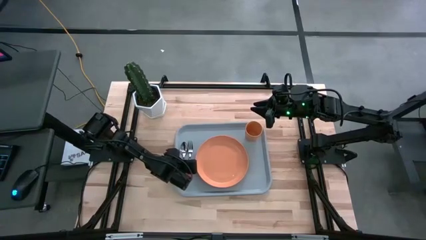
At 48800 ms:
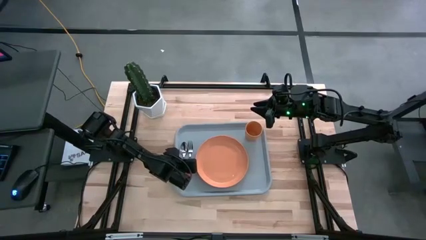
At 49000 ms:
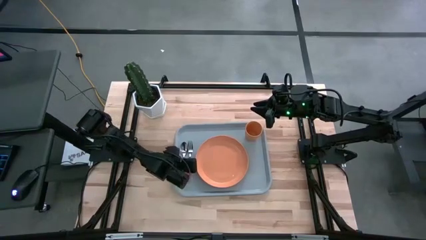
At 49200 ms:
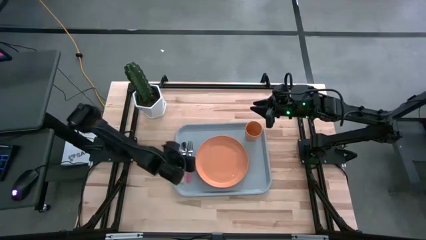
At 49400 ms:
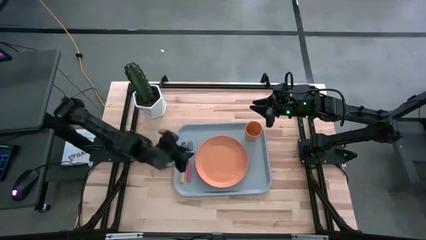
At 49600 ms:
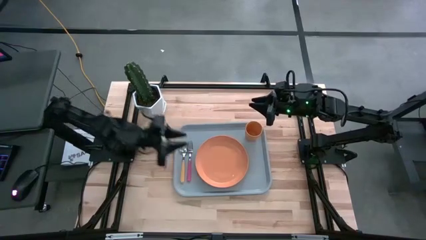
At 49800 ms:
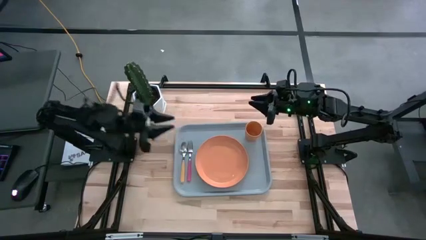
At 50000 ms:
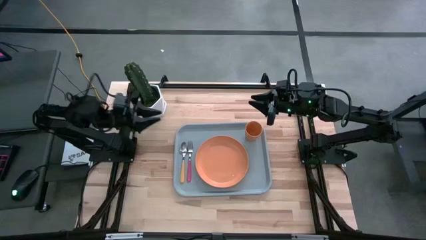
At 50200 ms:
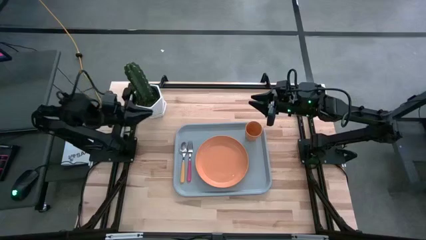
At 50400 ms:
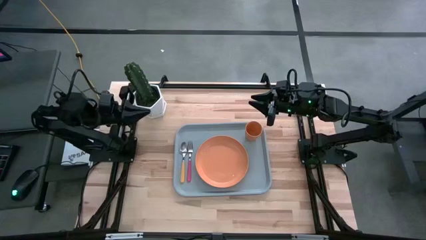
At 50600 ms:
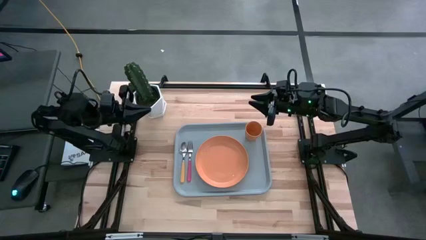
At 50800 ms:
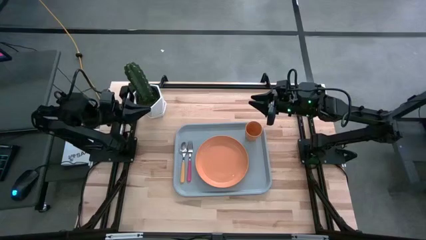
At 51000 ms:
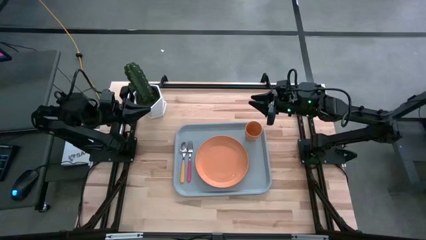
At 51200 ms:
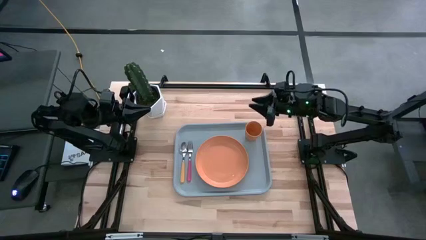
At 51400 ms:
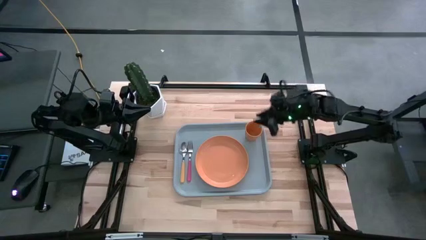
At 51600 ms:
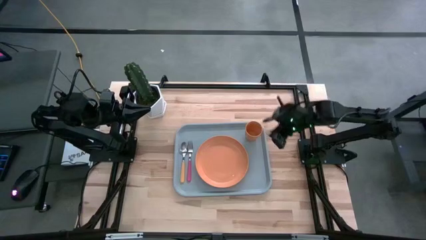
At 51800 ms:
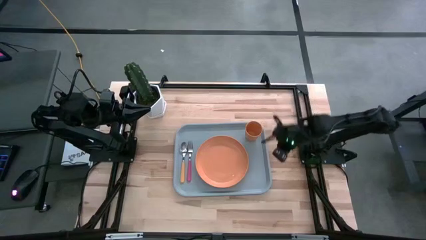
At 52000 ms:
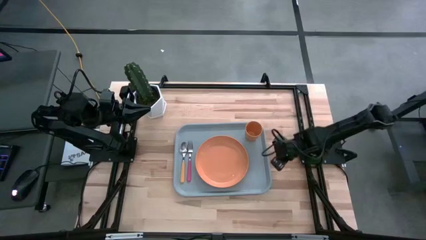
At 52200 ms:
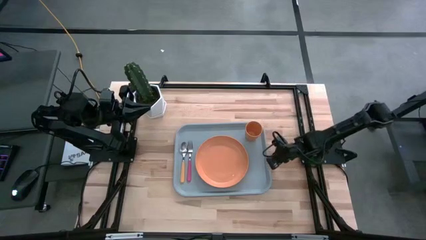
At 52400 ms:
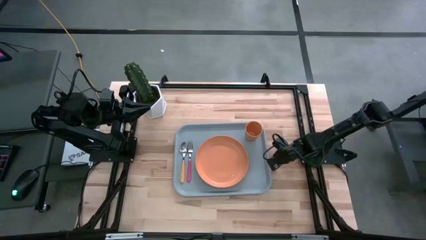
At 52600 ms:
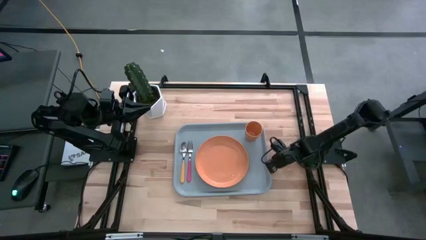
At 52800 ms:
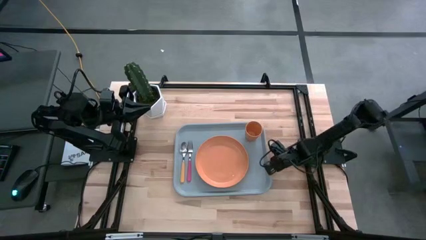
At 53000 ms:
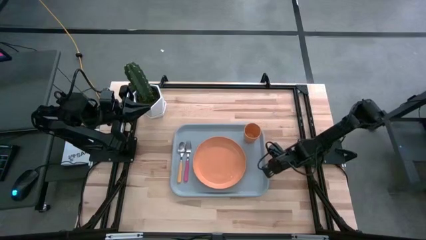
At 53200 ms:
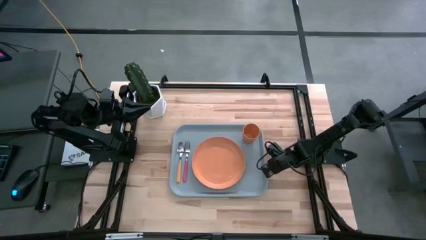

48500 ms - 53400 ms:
Task: Pick and place plate/cup/fork/spoon on tray
Adjust the gray tray

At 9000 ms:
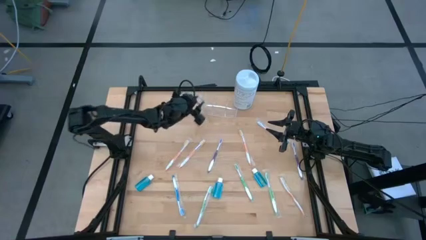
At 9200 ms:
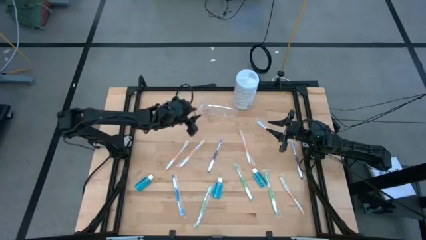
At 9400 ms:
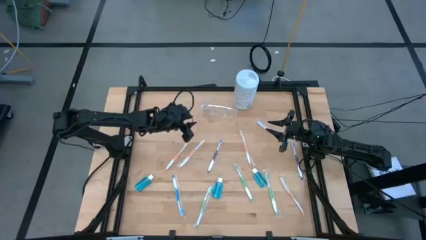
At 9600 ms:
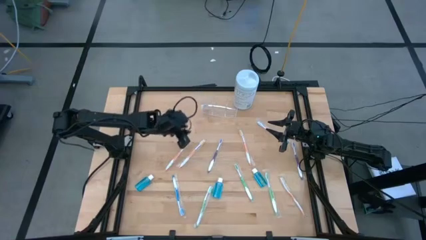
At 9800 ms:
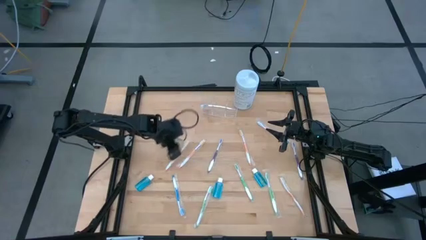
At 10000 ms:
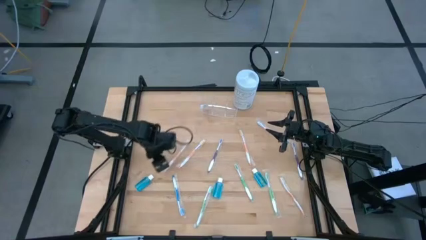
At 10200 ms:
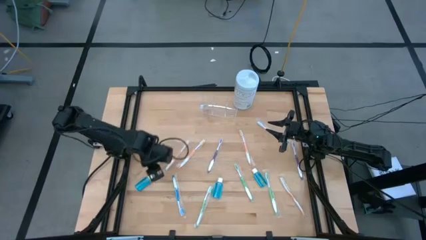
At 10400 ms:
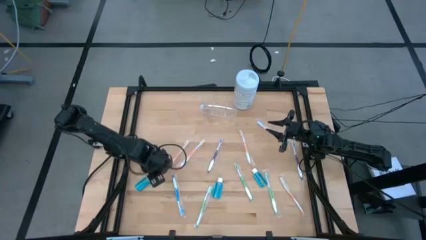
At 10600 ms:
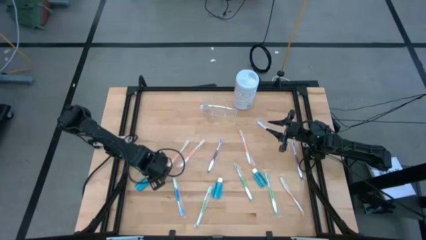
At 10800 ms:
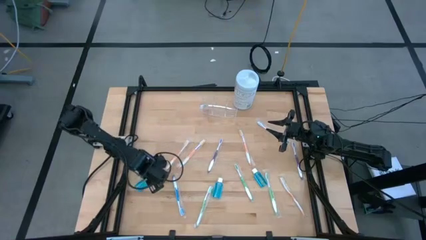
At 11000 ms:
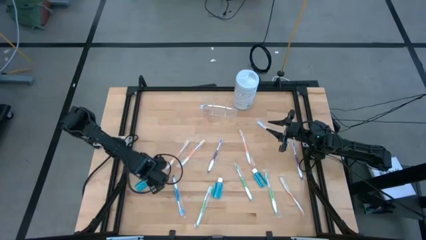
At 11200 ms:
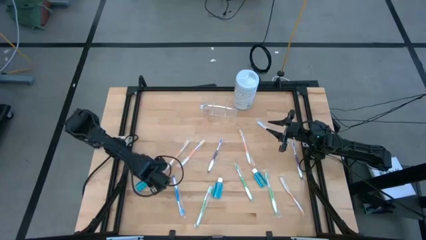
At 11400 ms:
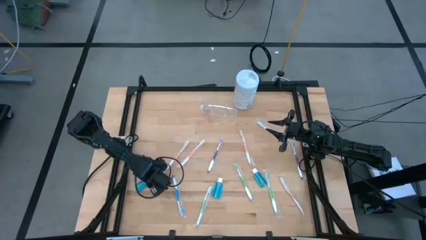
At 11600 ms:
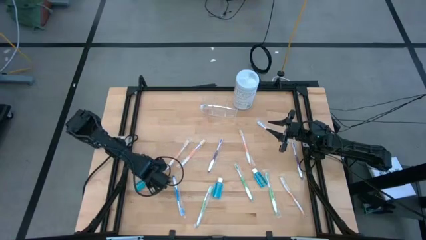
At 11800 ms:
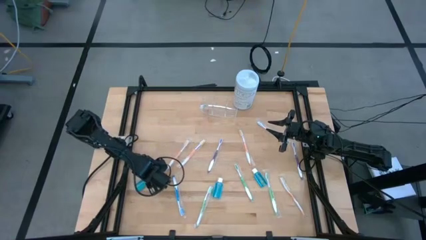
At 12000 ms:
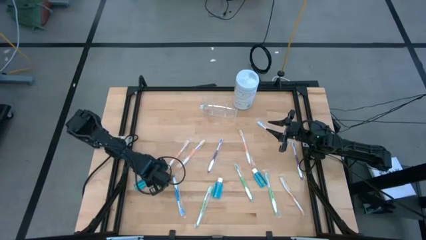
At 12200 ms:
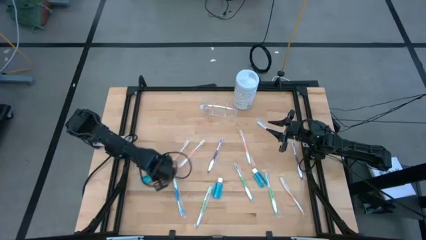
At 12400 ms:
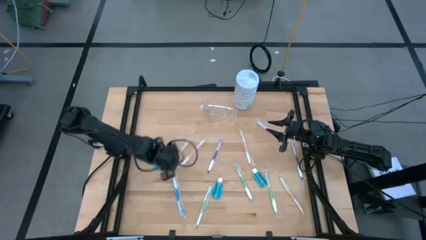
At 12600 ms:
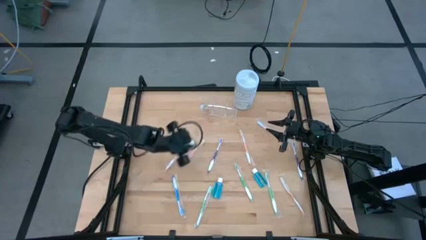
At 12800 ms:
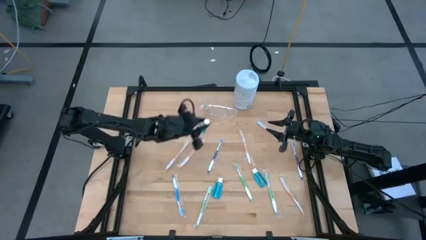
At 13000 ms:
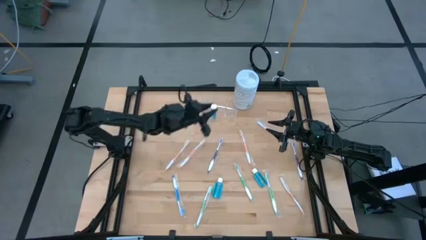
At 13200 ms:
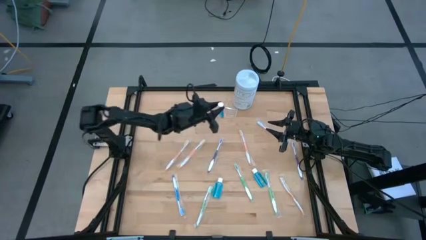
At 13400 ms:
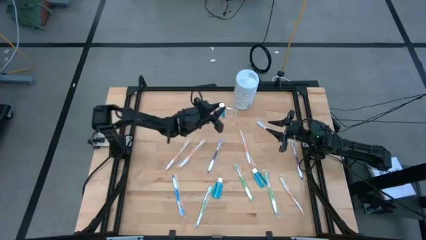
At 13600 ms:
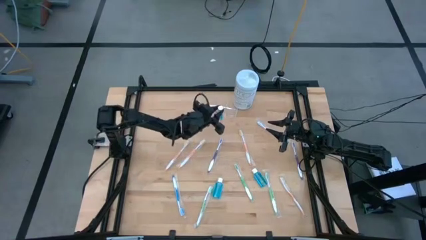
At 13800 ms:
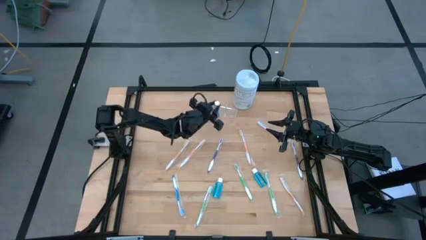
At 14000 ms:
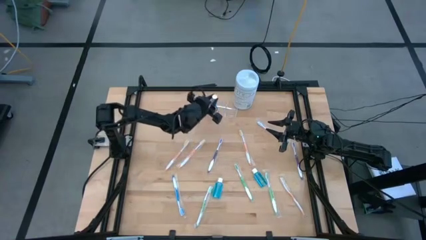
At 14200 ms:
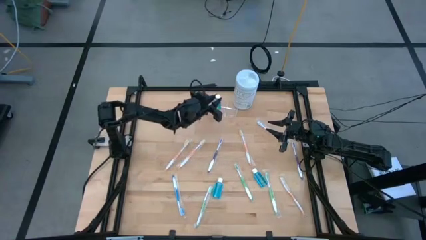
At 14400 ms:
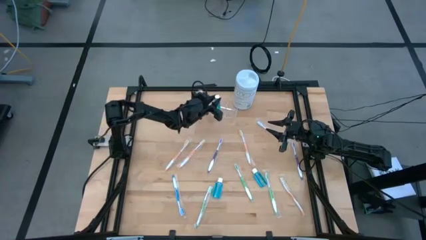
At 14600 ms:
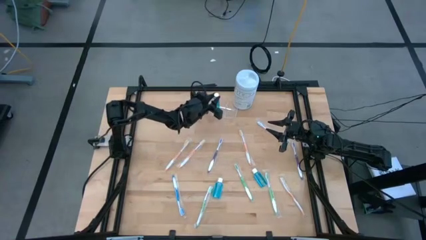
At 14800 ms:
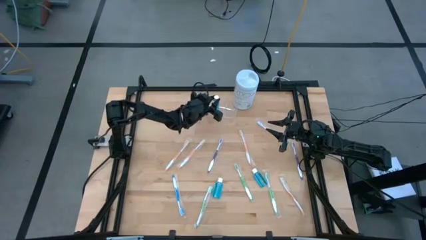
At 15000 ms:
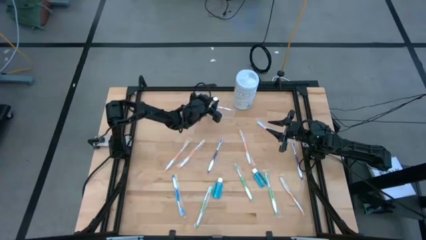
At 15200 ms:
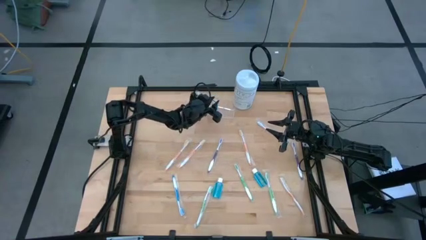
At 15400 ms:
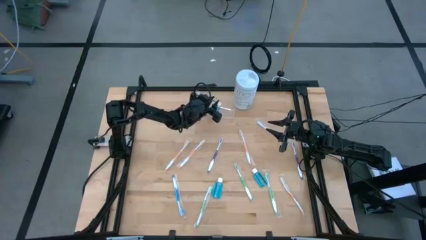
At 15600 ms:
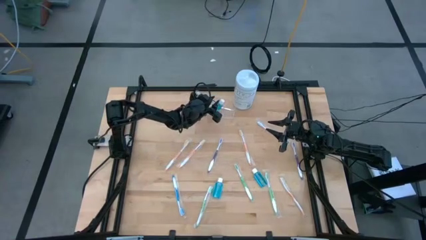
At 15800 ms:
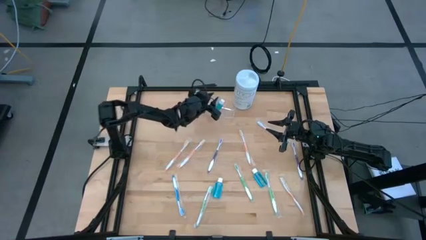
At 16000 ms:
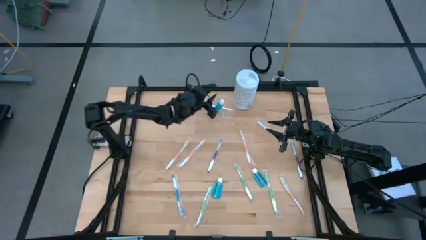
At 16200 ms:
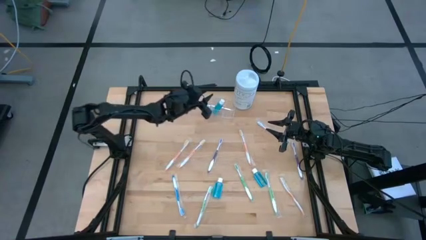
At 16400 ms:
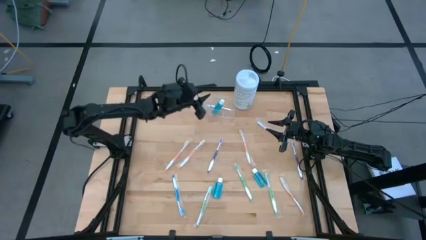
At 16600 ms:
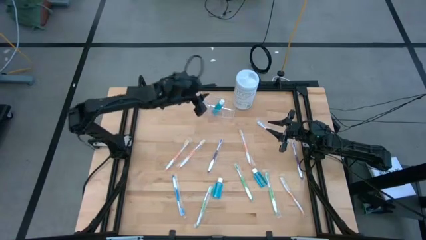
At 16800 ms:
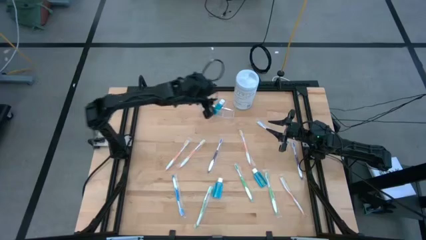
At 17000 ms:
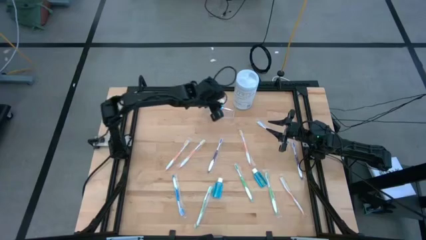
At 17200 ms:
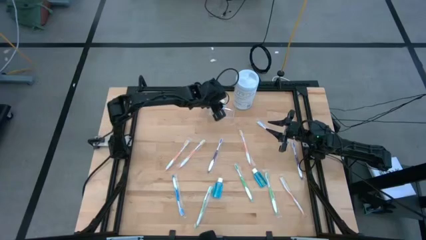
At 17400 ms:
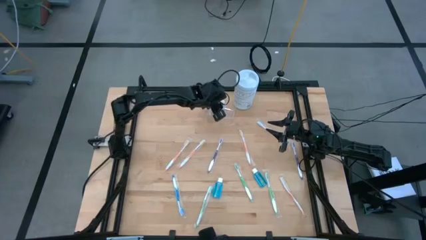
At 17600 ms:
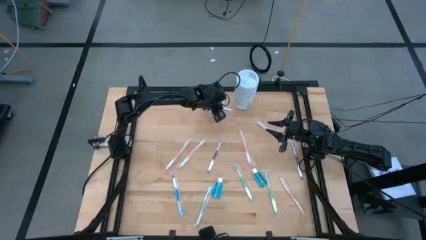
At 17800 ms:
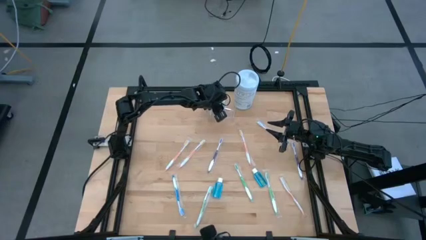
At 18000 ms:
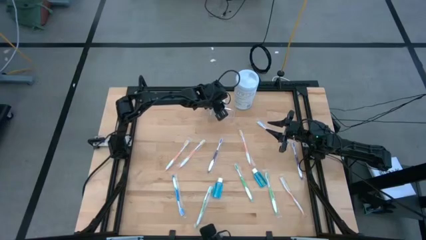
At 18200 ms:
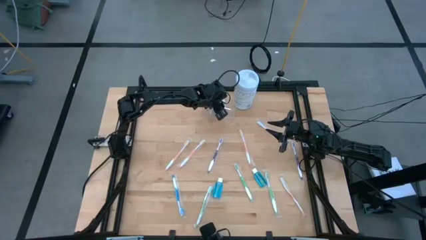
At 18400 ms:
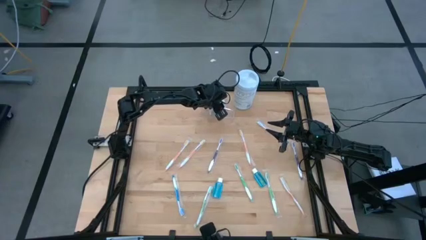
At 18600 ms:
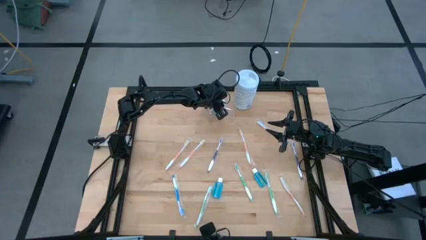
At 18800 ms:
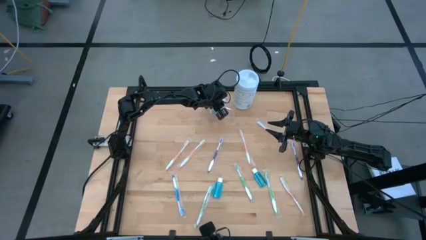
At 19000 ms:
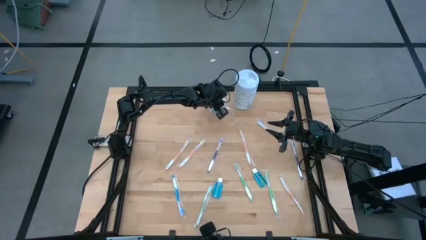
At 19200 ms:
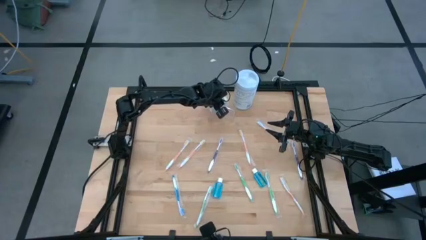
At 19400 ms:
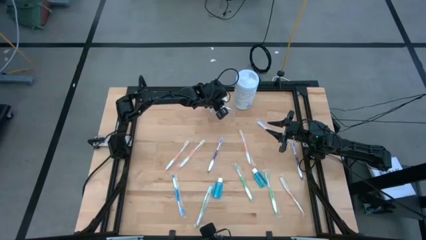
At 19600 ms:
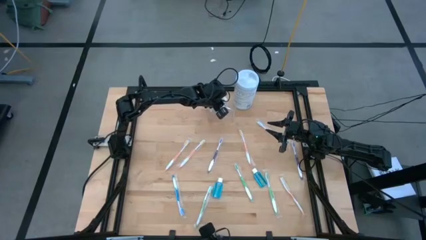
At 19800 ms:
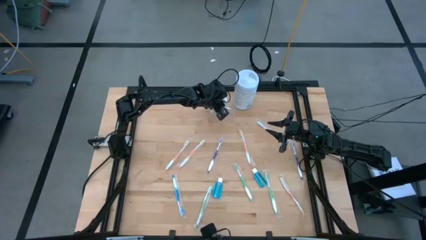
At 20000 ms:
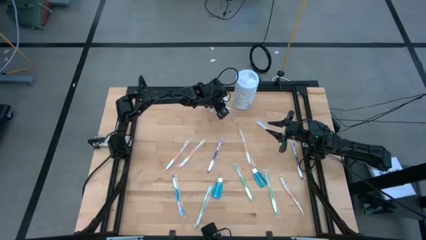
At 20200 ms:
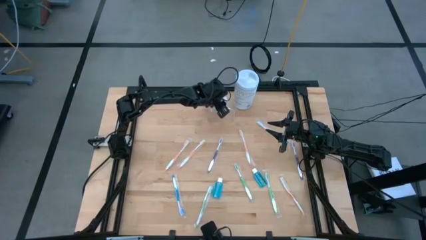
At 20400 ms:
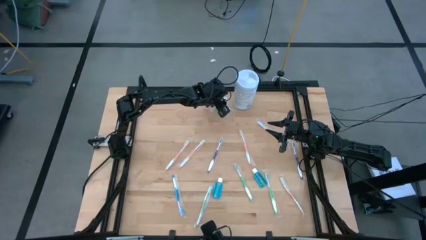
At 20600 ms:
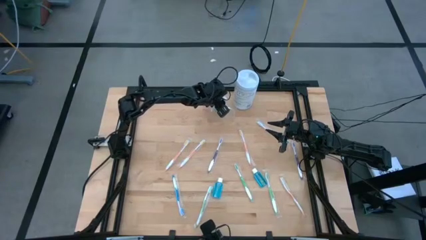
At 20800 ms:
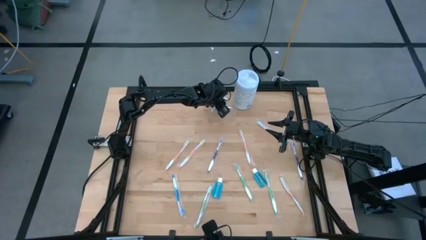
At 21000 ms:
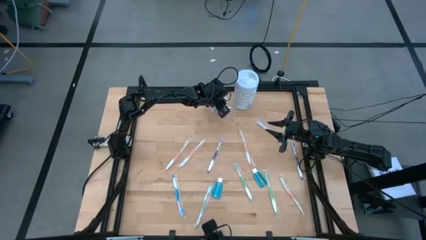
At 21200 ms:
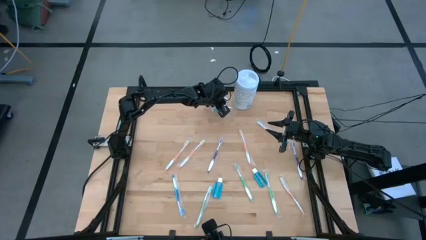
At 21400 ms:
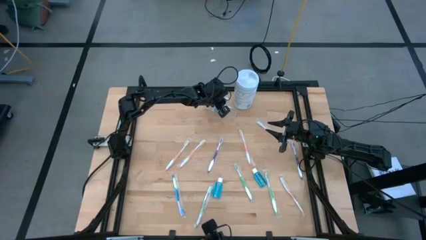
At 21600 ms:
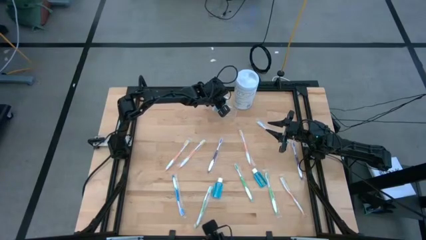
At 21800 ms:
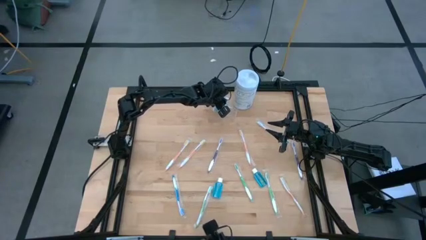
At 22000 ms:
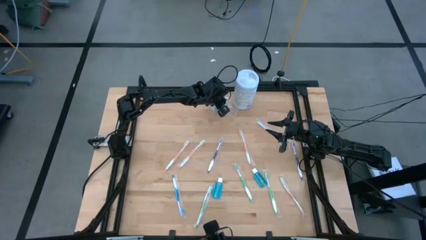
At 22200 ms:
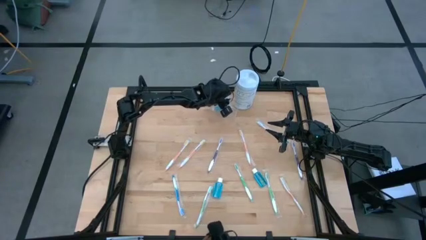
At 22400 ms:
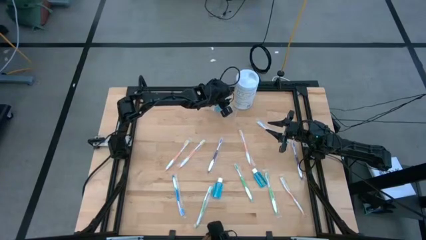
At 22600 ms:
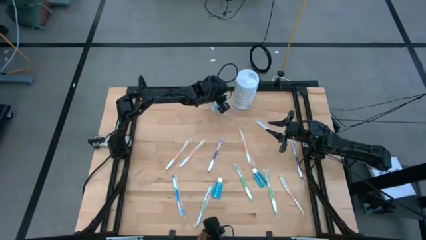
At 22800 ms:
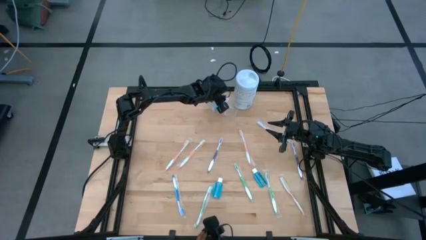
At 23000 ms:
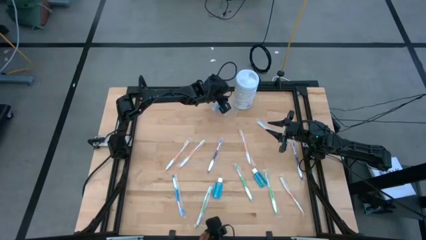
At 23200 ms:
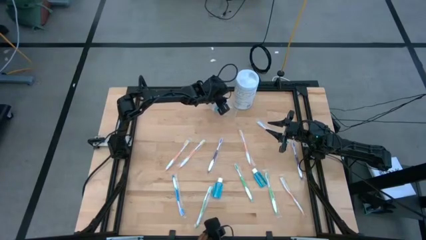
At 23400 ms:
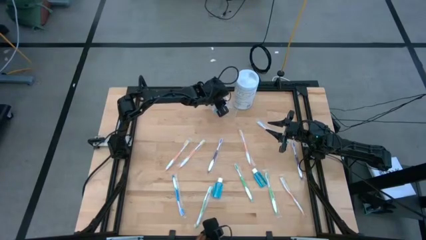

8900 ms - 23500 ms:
Task: Pick & Place toothbrushing station
Put the blue mouthwash into the transparent organizer
